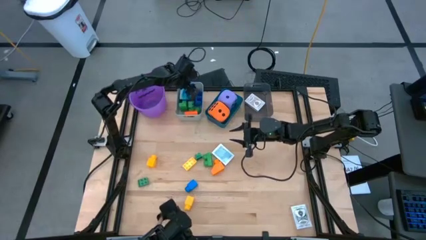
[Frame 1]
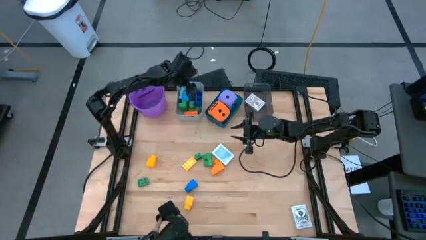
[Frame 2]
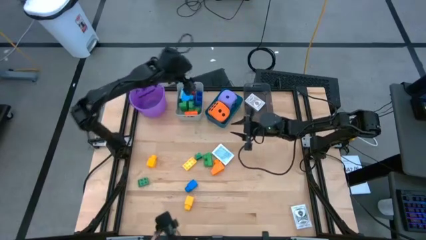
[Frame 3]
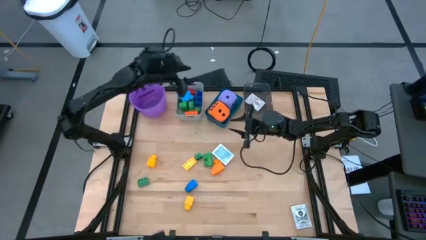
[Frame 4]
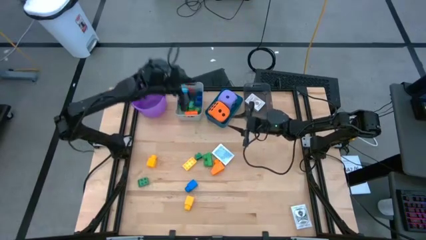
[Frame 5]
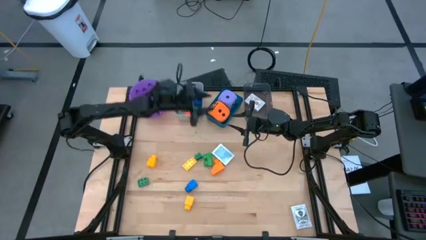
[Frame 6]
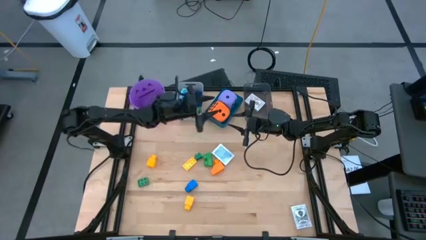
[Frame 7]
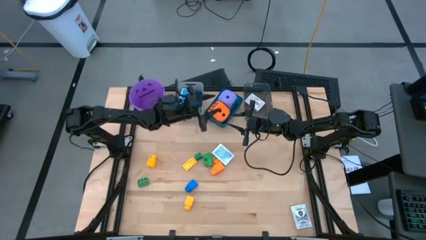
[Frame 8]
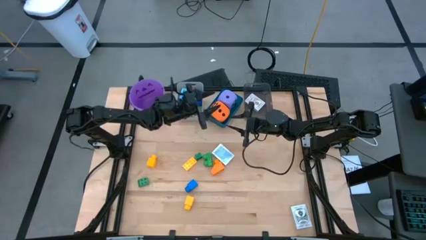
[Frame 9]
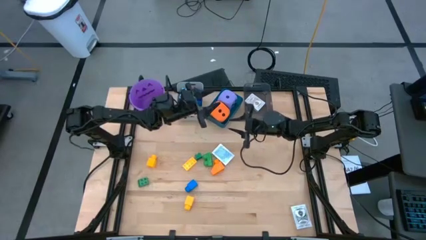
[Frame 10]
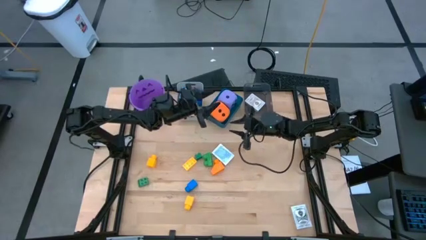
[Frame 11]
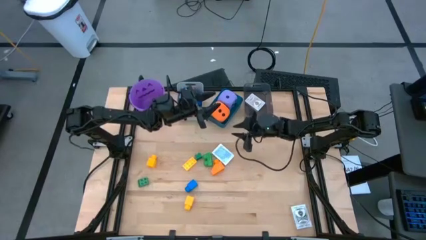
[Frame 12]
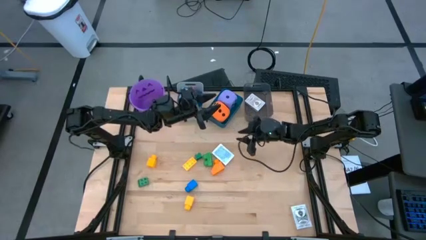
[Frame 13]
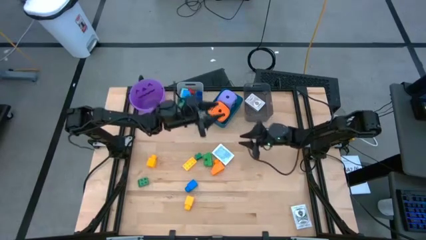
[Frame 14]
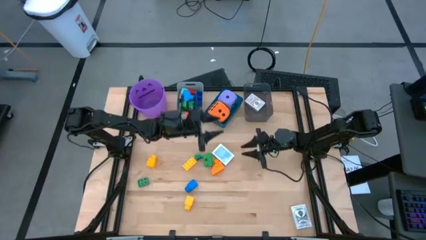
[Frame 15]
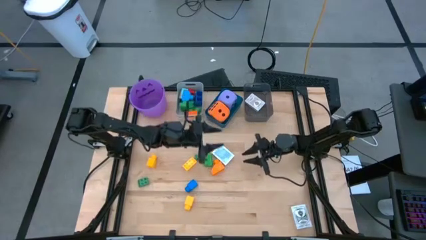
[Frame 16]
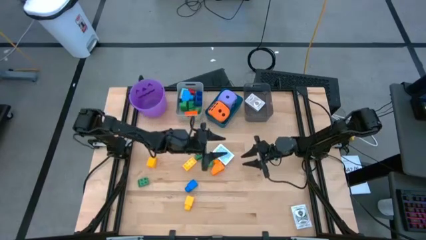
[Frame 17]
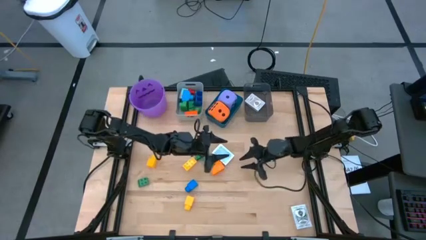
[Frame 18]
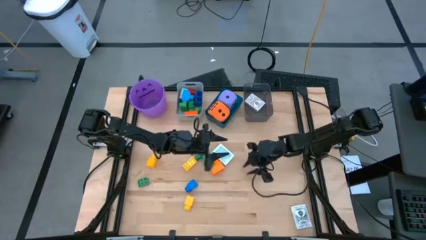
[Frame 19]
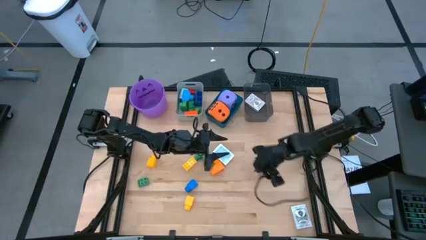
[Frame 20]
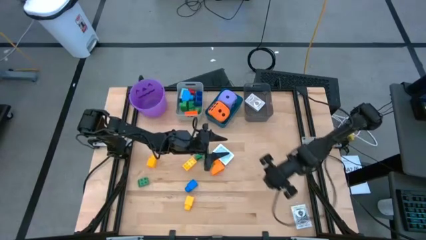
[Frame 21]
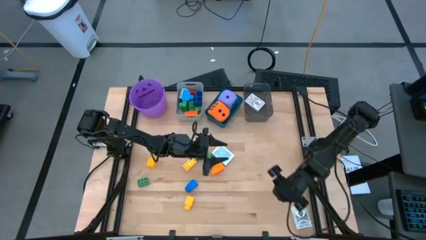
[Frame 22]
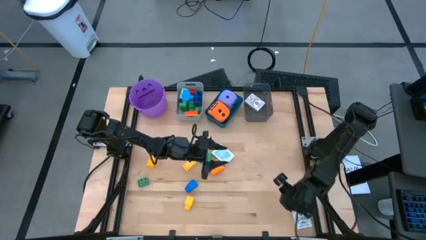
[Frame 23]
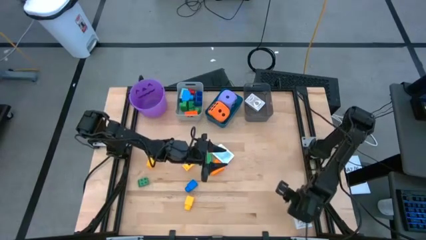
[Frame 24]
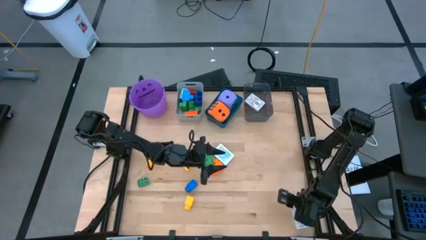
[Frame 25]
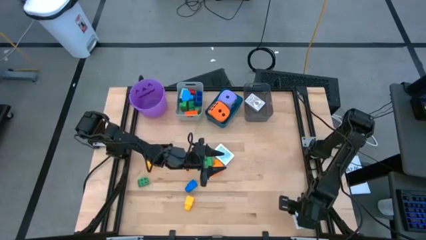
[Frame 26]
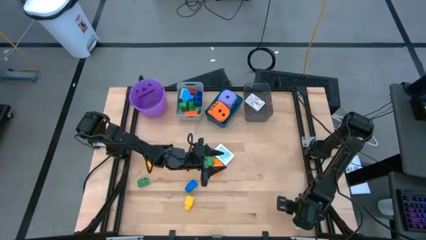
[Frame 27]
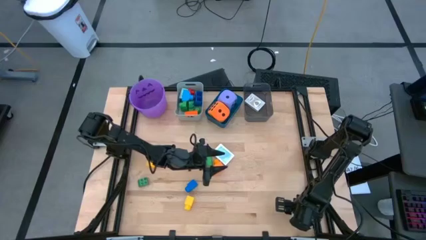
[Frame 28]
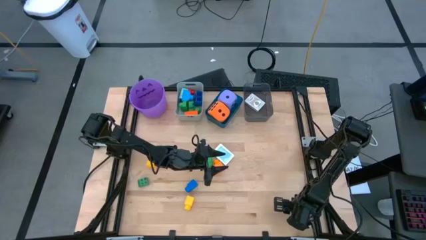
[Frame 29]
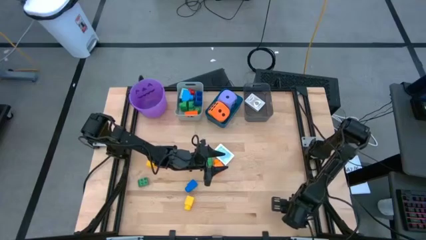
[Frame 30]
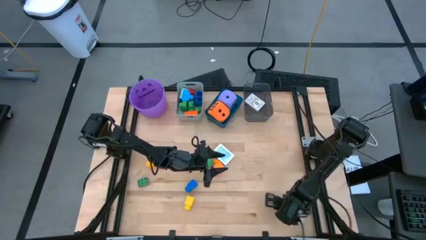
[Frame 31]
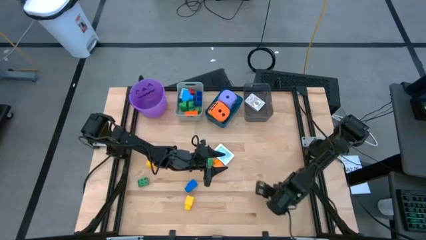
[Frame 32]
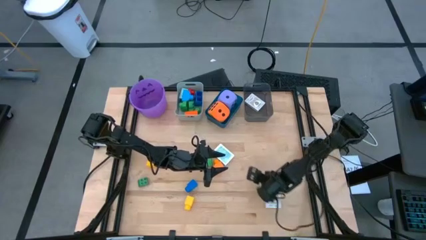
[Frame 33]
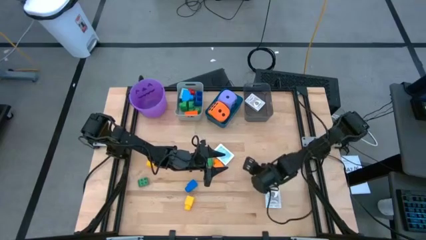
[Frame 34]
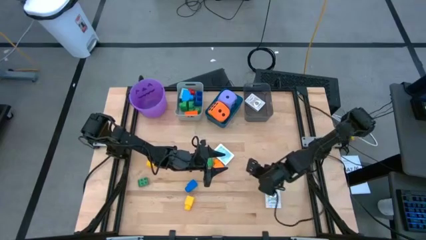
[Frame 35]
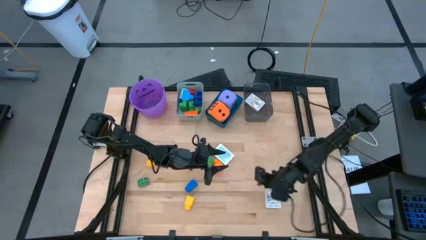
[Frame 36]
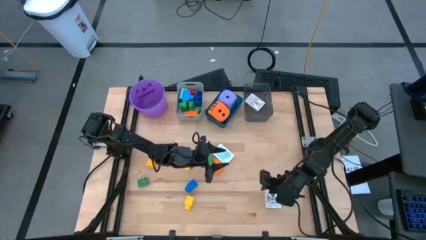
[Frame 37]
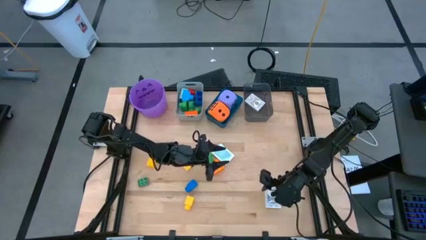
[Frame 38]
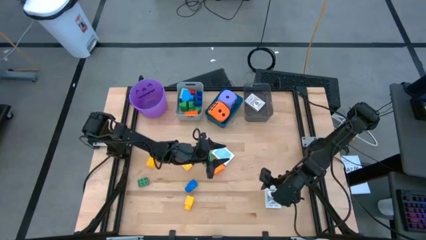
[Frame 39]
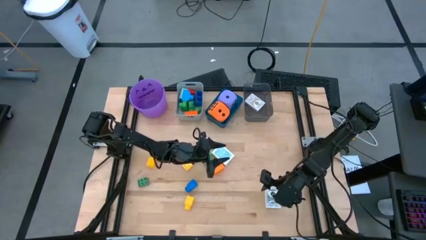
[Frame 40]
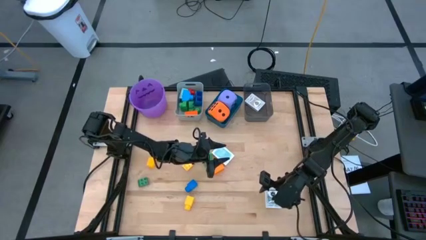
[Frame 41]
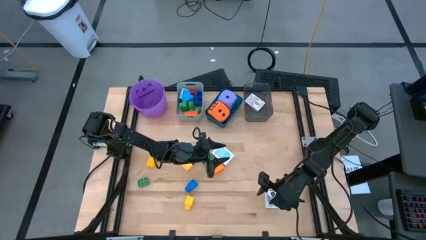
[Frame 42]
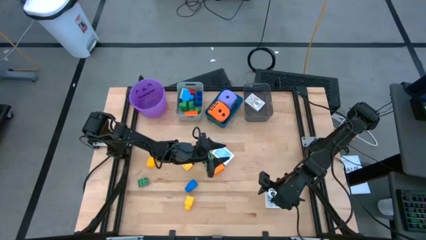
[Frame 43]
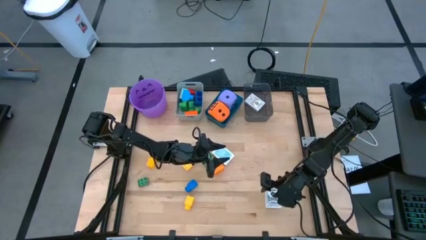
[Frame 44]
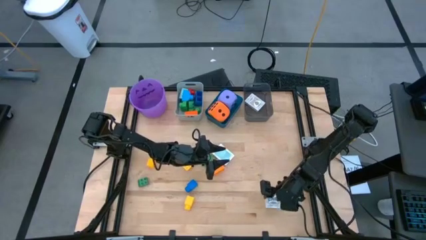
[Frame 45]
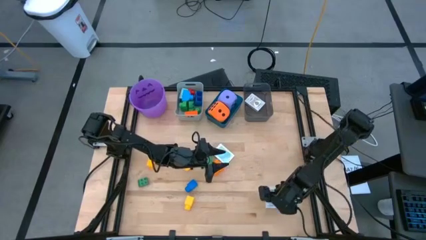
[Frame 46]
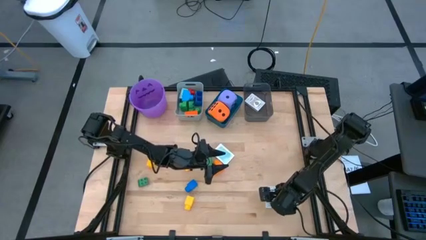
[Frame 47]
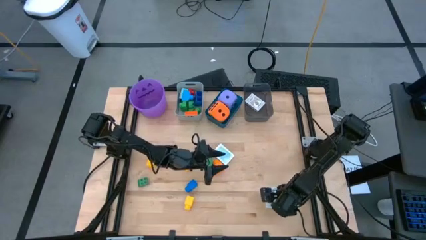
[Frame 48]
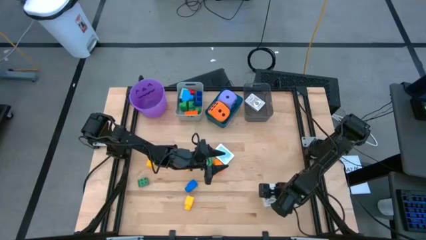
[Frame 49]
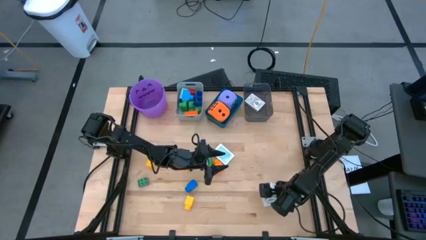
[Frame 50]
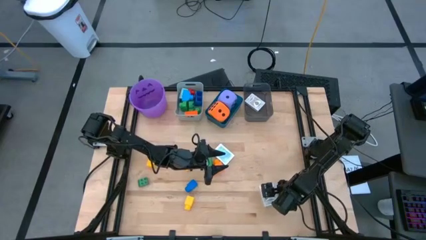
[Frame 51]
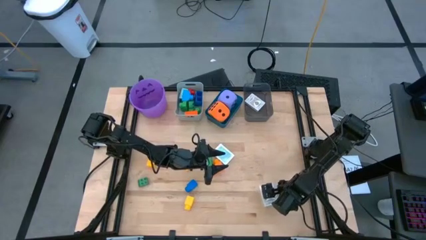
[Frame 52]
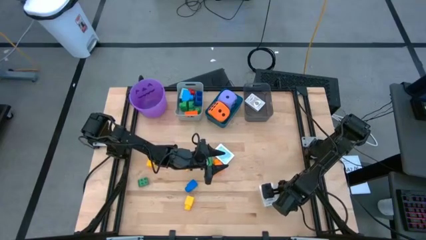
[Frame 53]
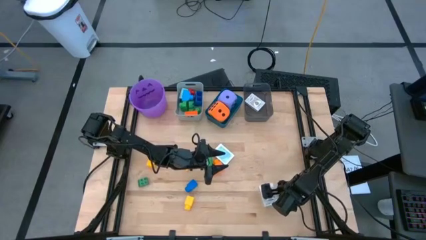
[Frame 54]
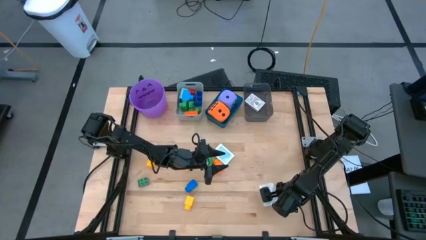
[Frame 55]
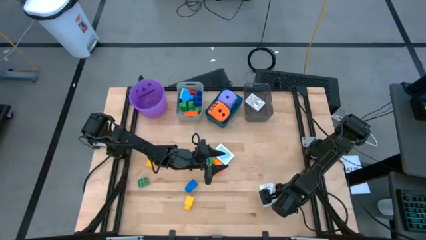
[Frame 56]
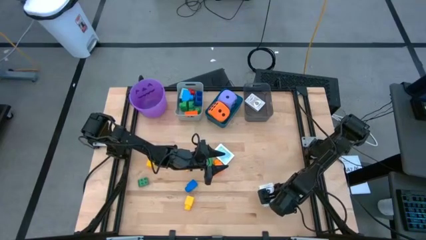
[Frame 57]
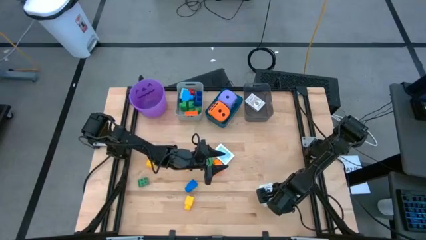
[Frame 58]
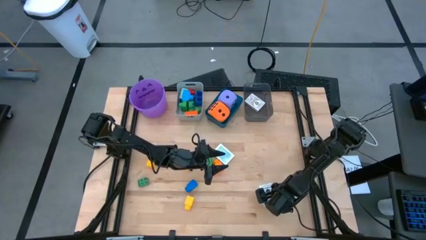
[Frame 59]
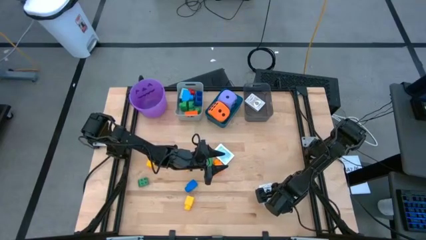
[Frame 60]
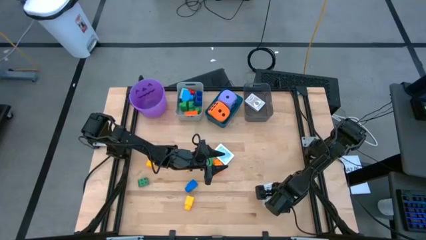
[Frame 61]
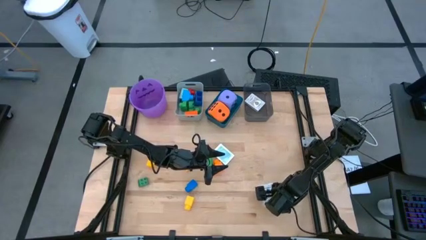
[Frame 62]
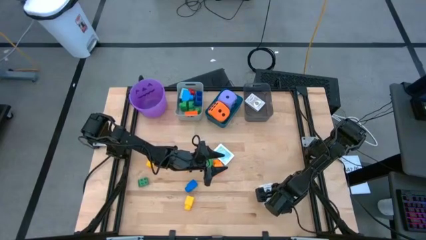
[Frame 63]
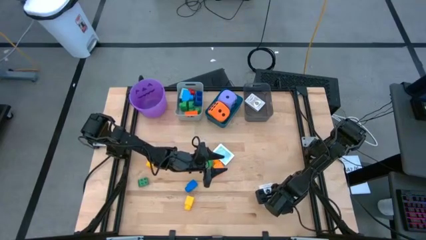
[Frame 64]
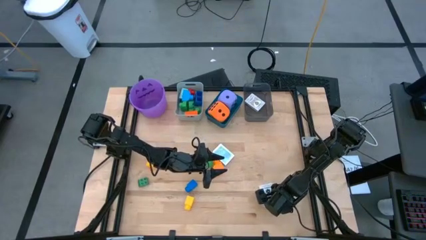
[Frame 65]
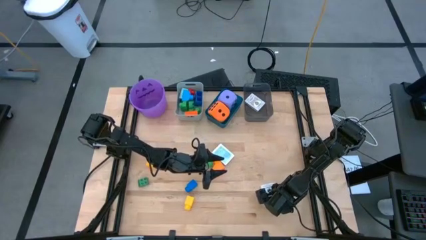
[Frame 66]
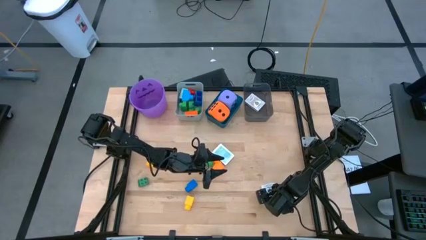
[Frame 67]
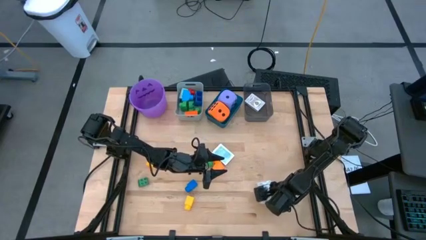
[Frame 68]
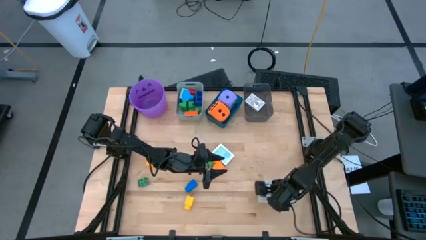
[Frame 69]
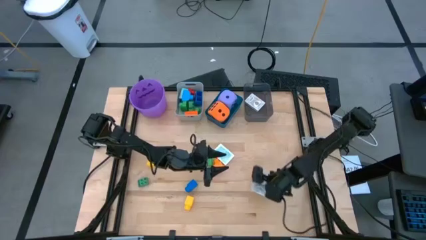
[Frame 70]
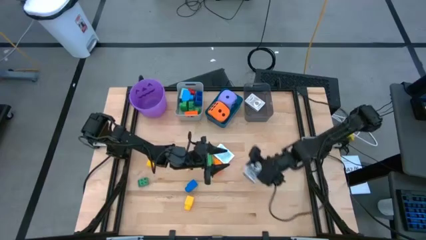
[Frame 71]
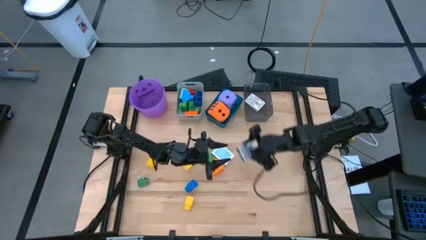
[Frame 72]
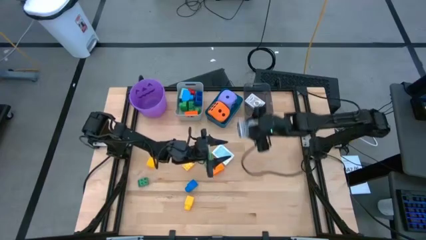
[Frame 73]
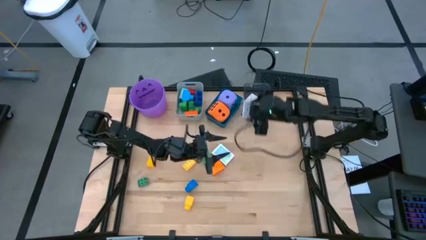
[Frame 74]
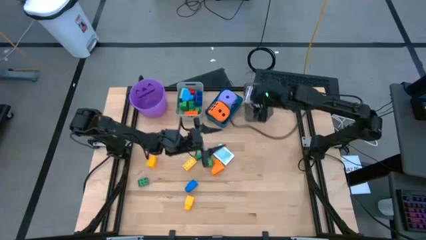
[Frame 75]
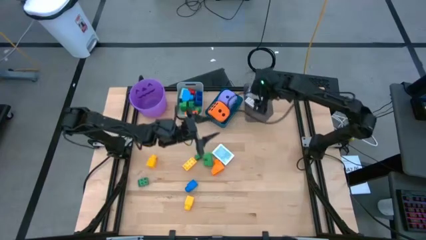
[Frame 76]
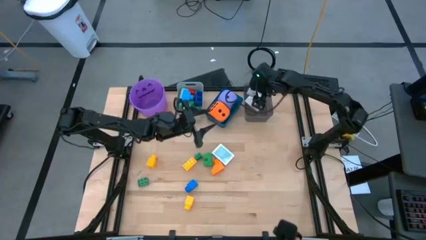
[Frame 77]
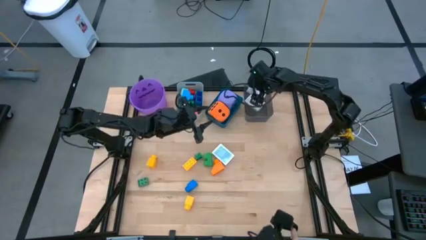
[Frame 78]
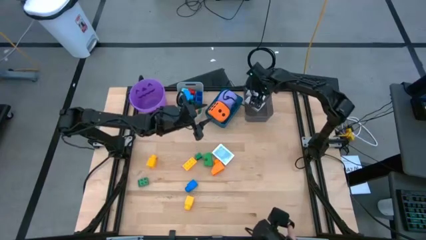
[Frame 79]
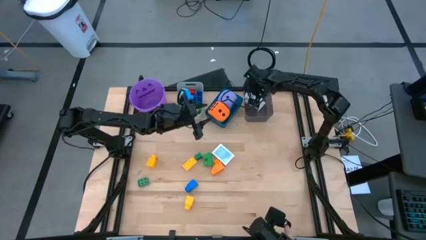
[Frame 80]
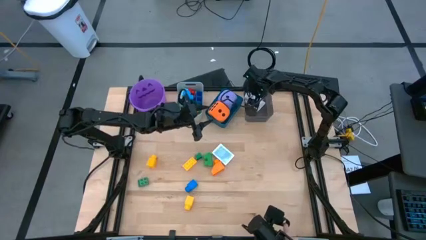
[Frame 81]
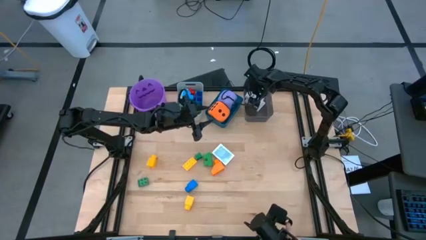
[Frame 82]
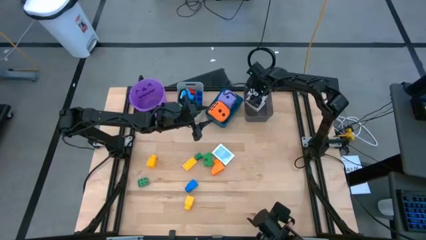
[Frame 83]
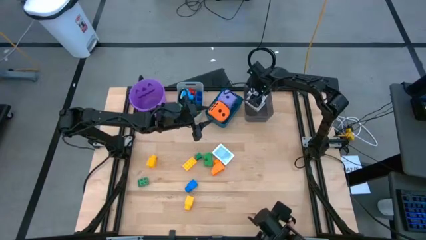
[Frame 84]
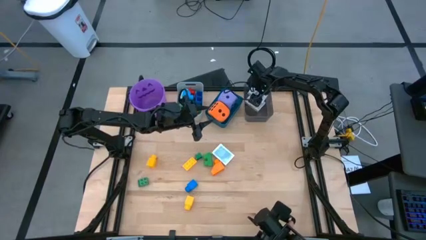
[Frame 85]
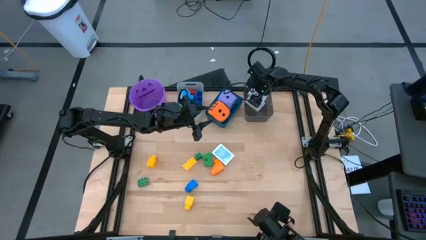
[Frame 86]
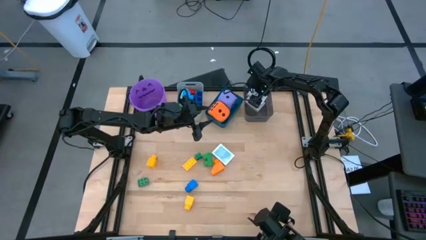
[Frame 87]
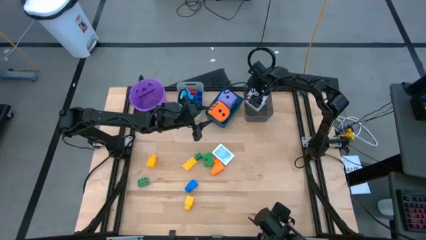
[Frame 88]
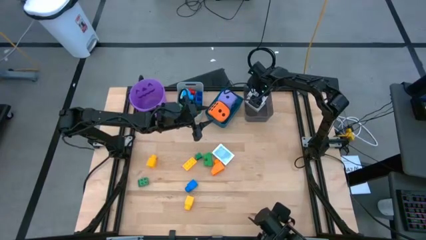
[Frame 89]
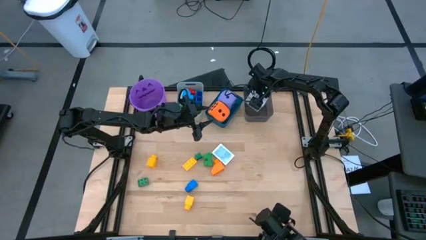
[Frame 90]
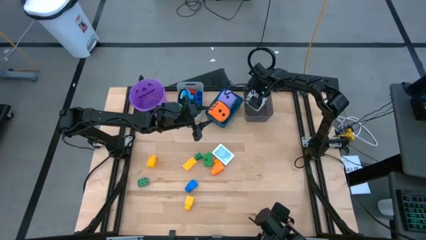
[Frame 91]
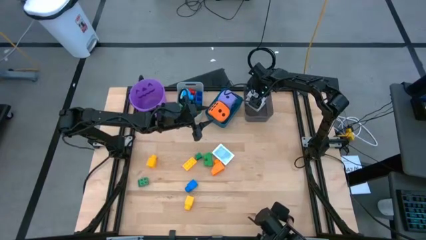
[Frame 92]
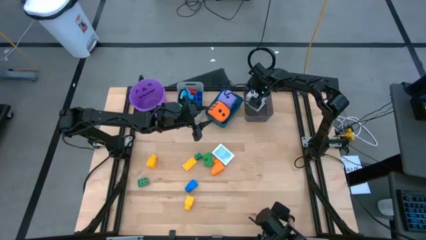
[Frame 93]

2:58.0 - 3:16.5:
Task: Pick & Place Toys
Put the black and white deck of cards into the black bin
